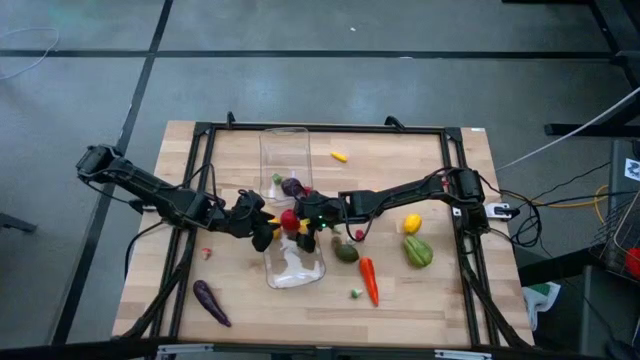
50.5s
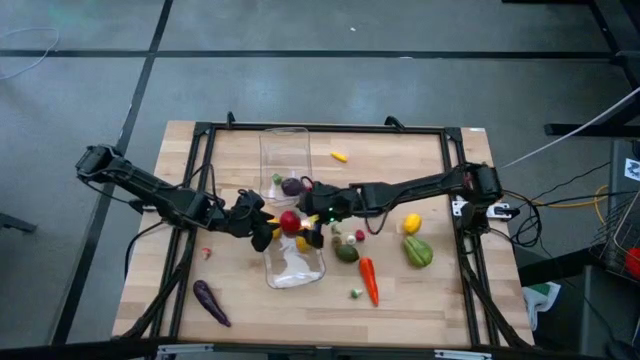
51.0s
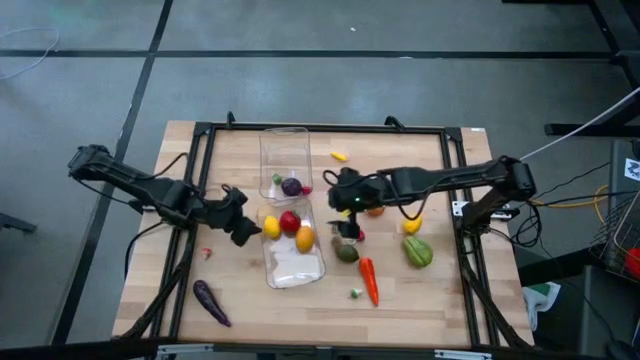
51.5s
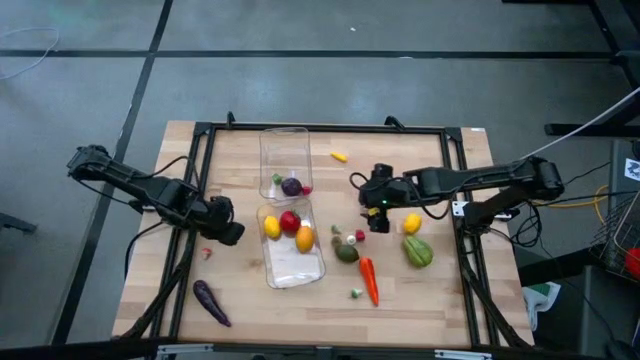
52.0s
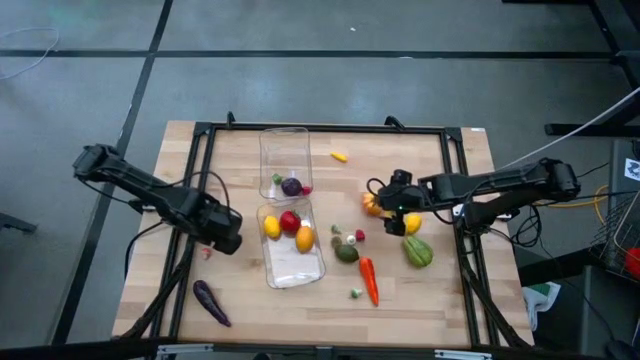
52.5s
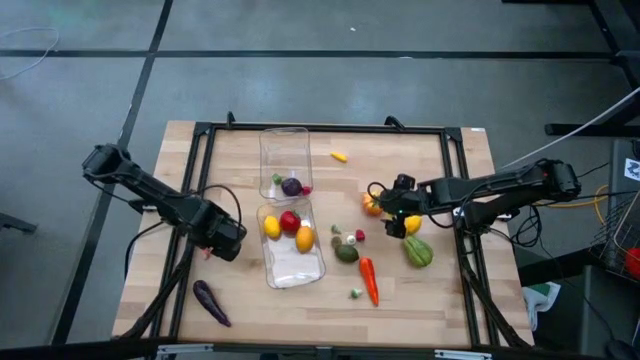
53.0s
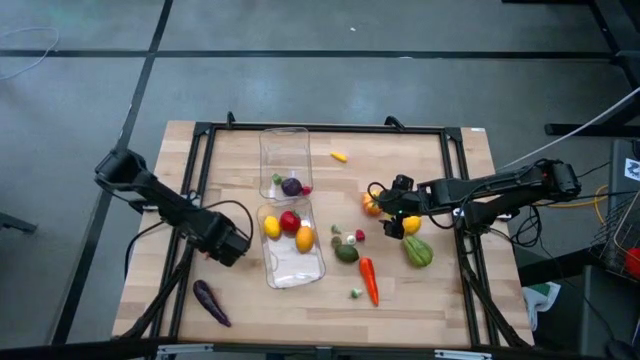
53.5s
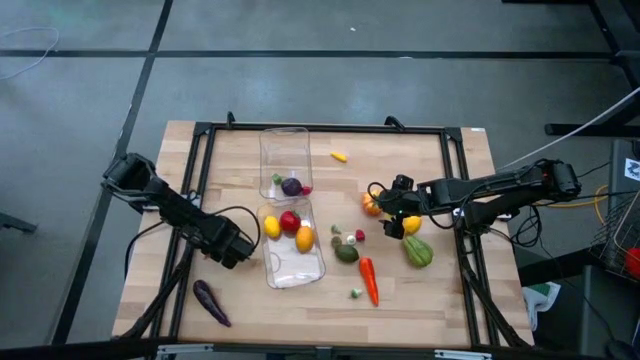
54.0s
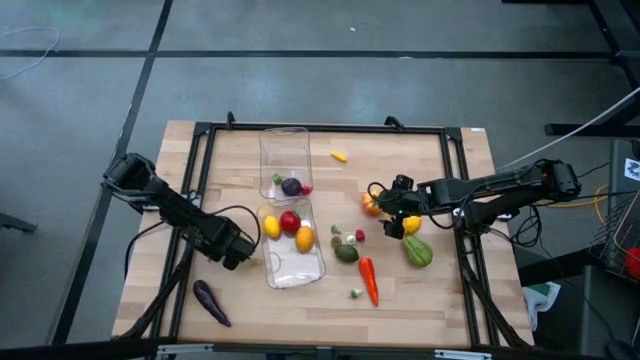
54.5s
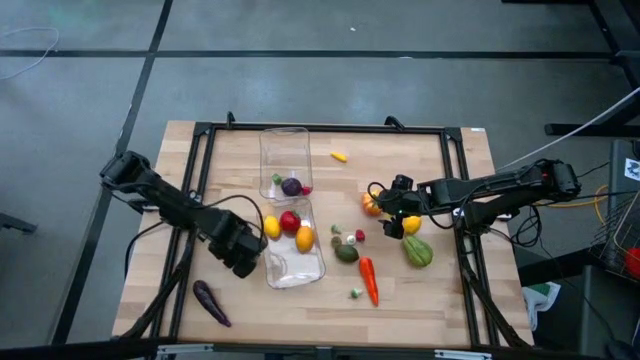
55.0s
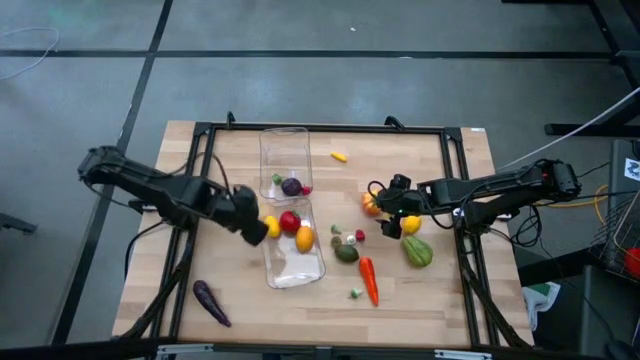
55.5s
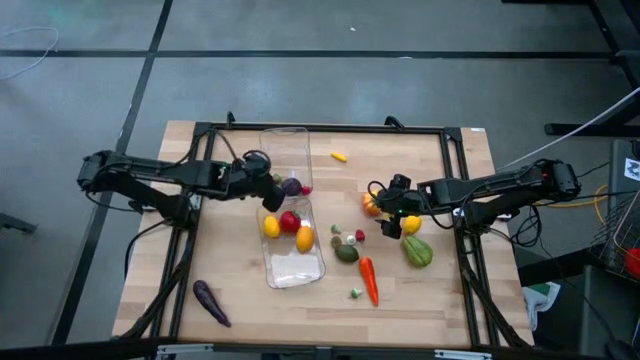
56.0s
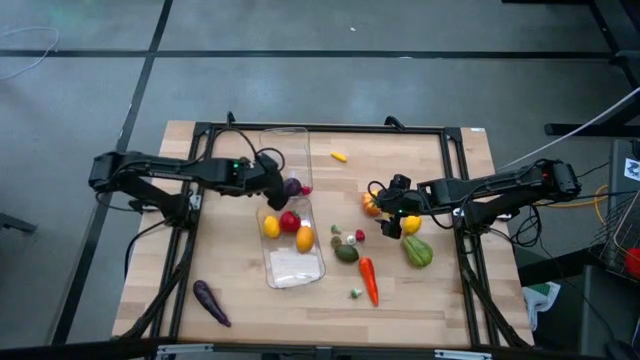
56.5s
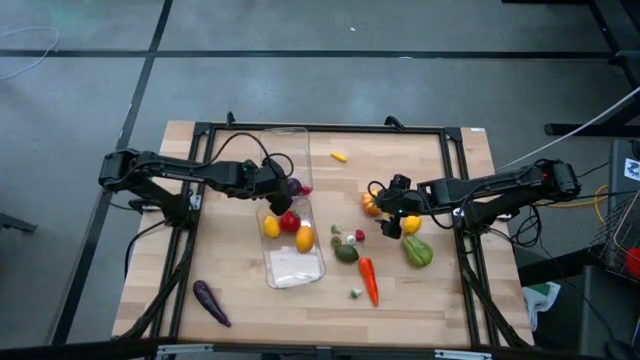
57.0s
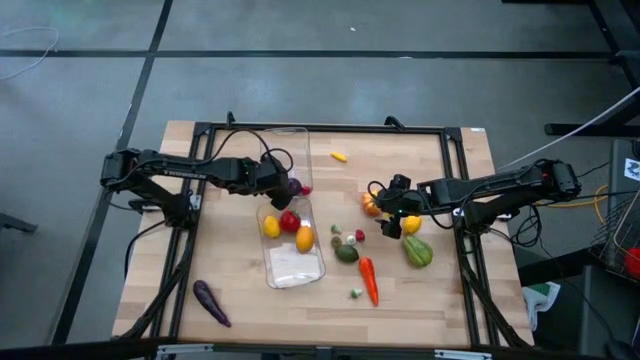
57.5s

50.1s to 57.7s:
Task: Sort produce into baskets
Put the red mushroom into the top transparent bin

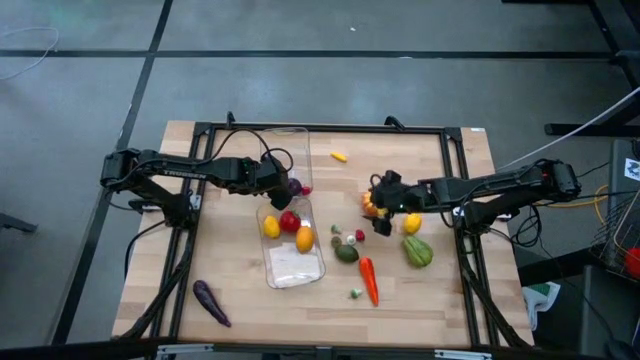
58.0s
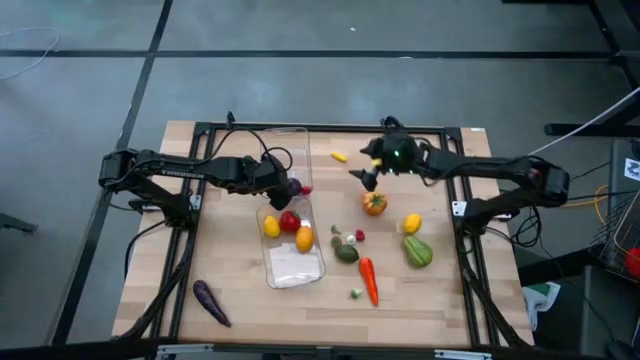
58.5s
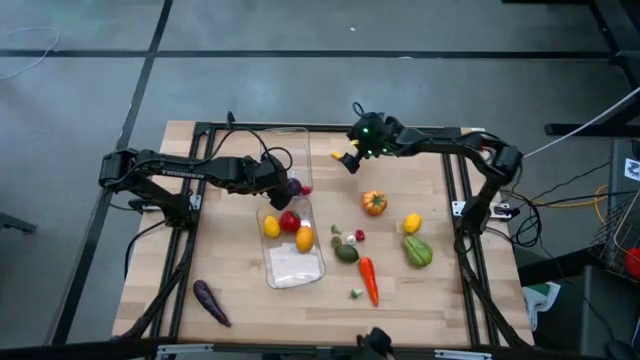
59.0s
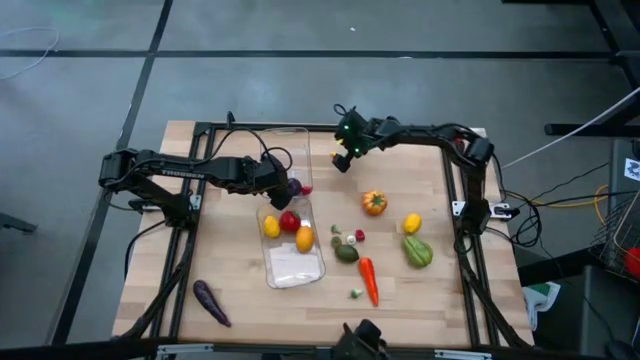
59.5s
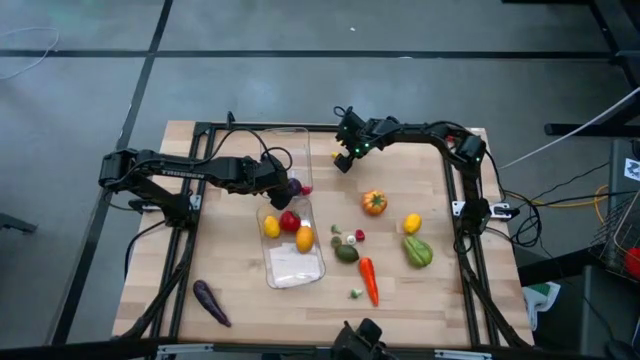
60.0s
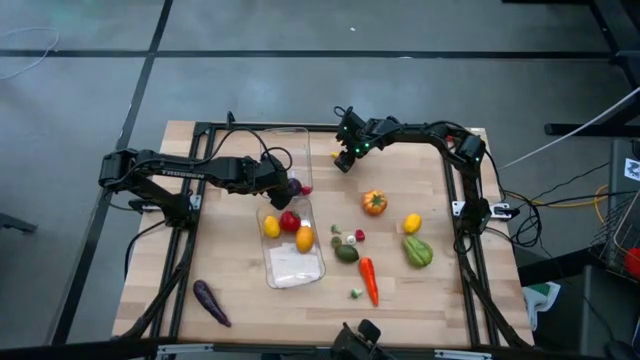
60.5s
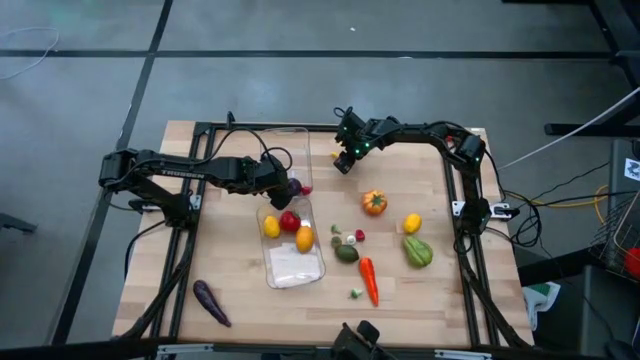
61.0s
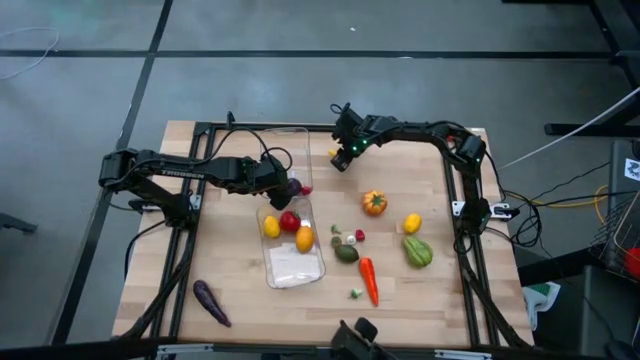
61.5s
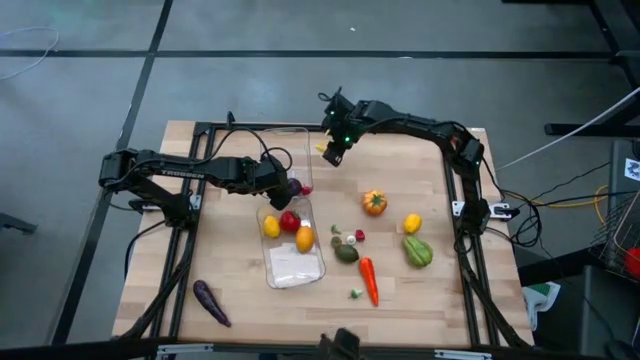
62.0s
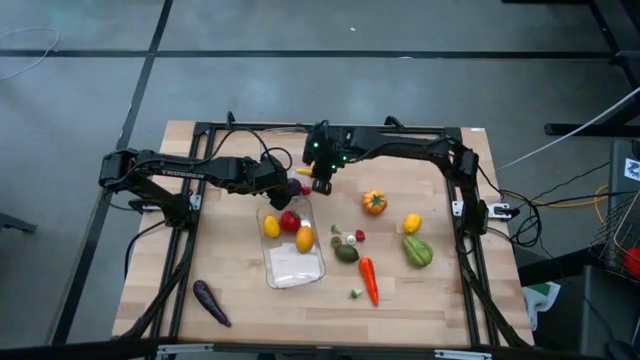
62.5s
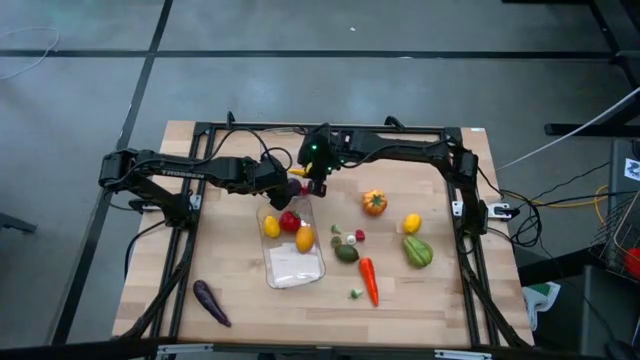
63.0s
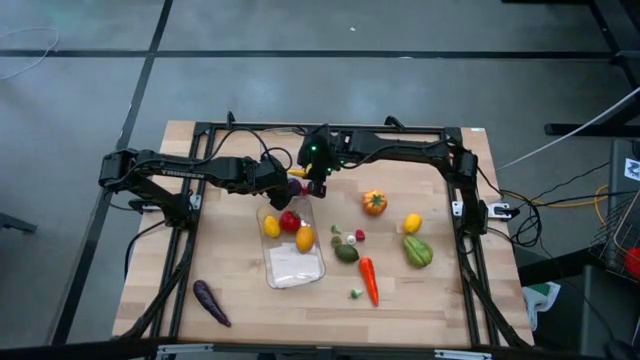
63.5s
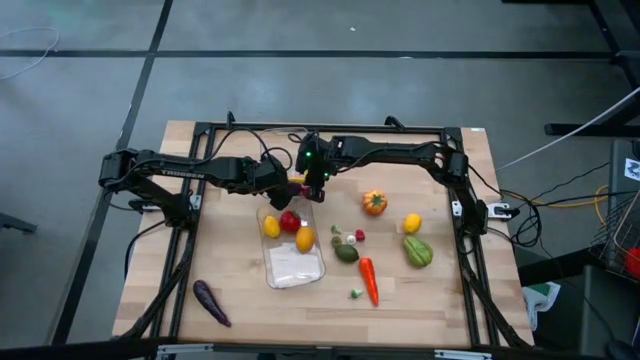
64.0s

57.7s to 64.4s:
Put the yellow corn into the top transparent bin

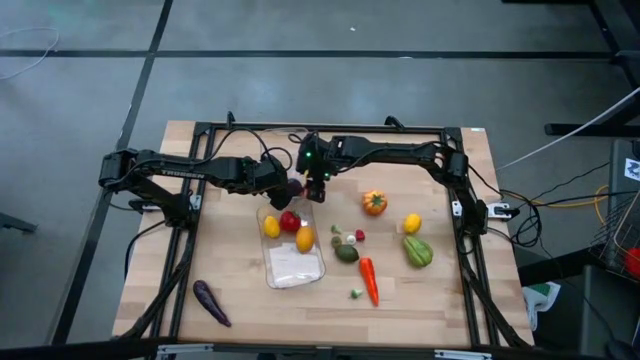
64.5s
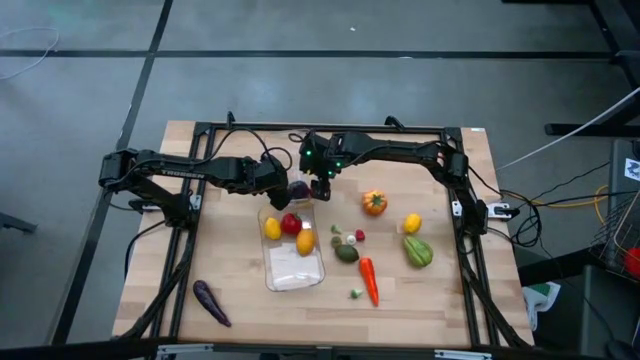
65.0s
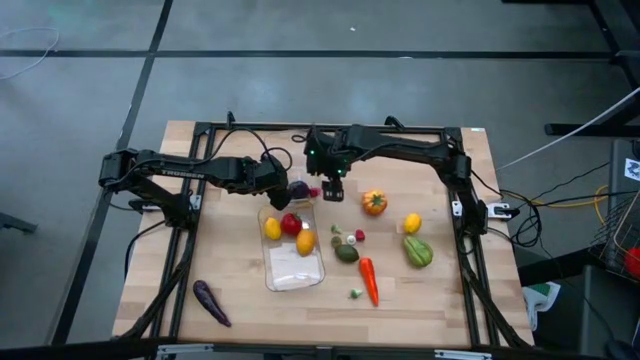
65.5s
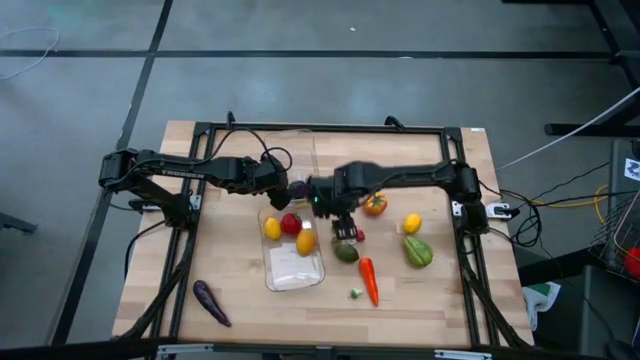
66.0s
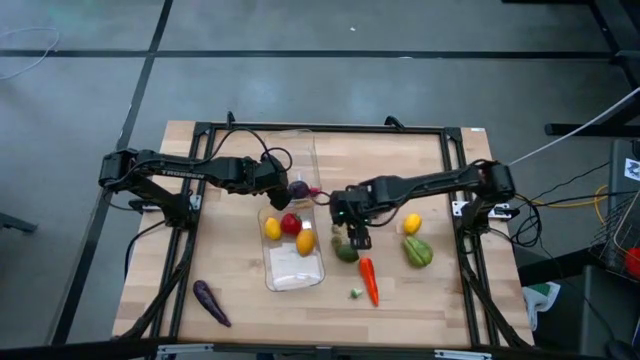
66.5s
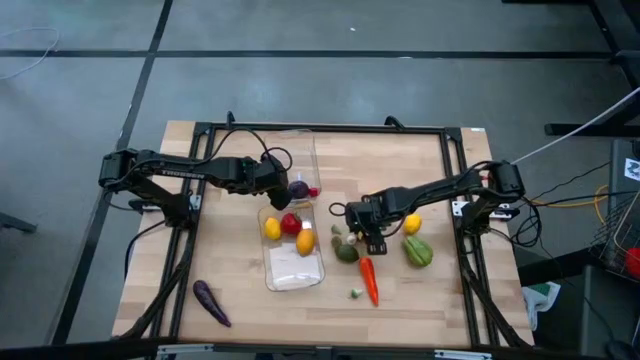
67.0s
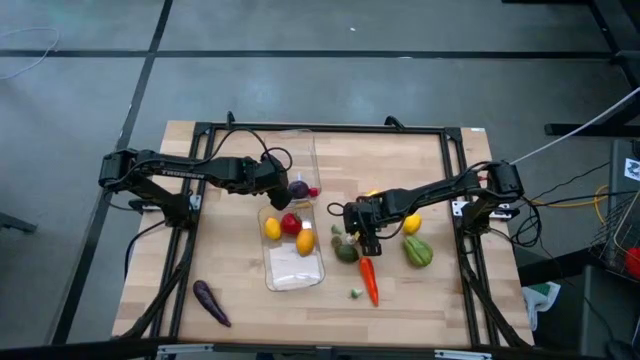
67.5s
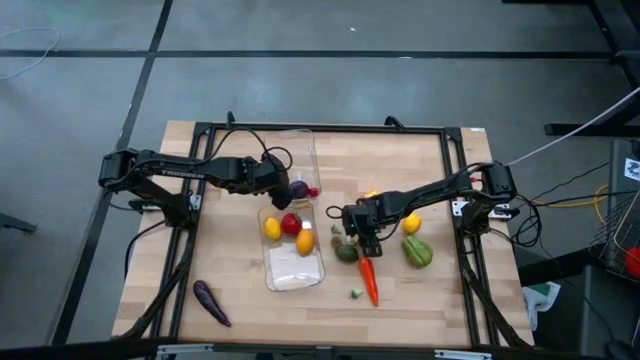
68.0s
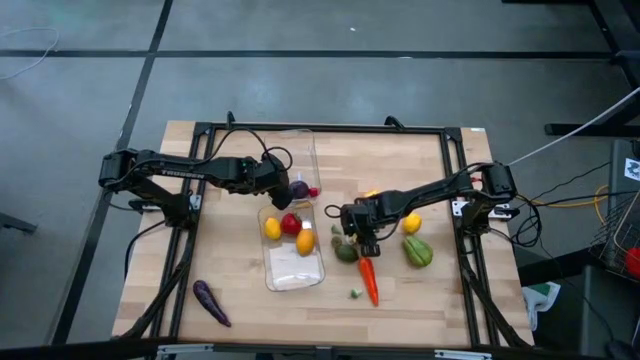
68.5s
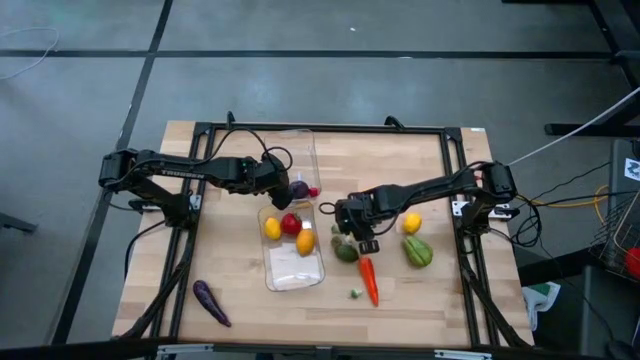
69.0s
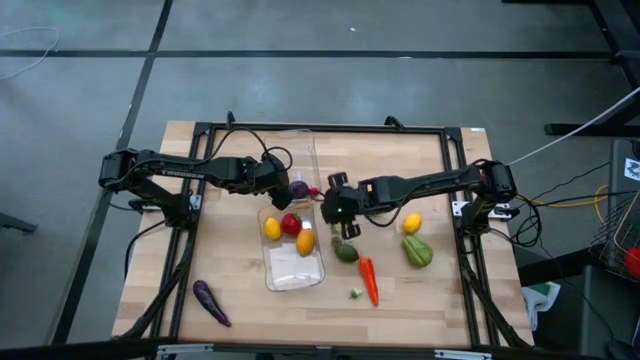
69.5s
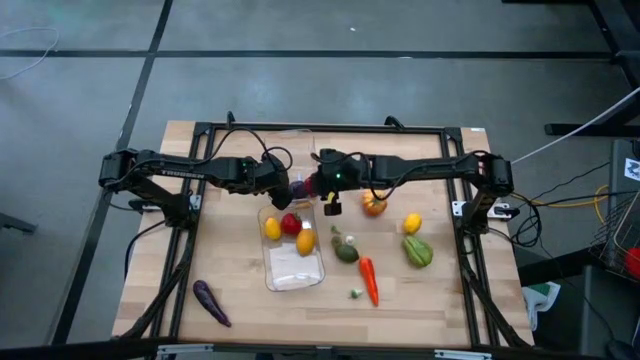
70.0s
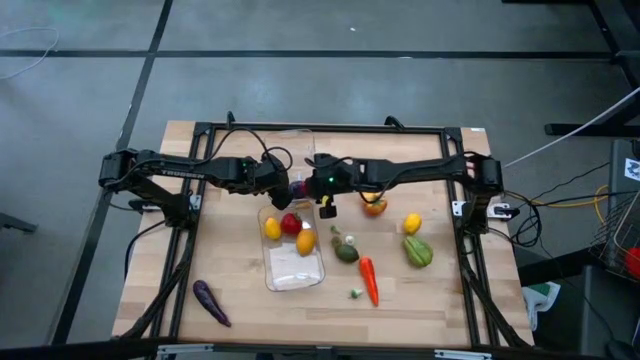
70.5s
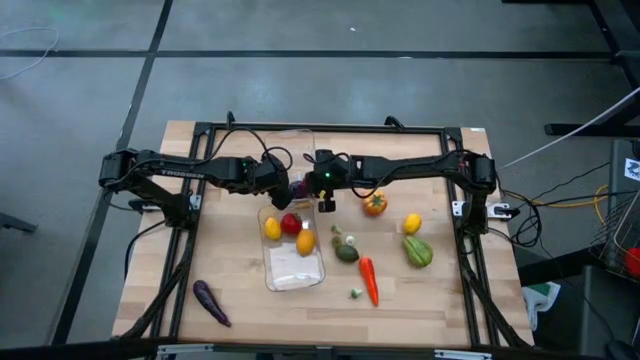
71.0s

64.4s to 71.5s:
Put the red bell pepper into the top transparent bin
